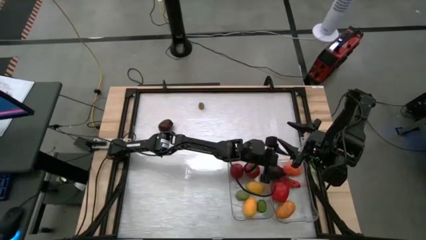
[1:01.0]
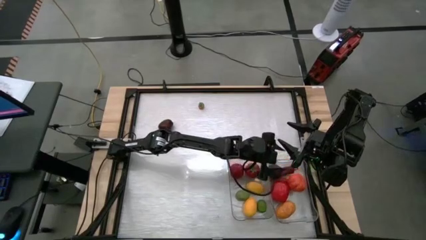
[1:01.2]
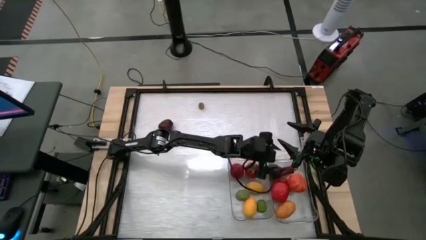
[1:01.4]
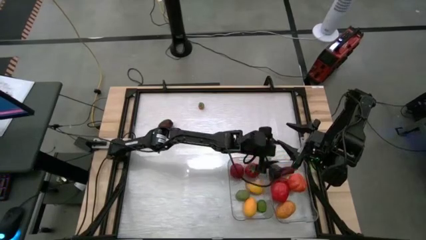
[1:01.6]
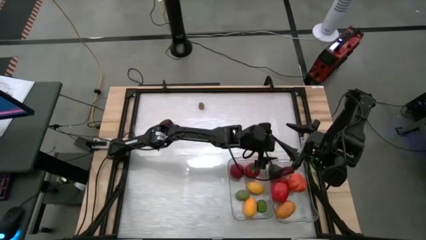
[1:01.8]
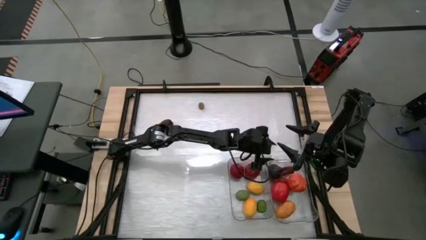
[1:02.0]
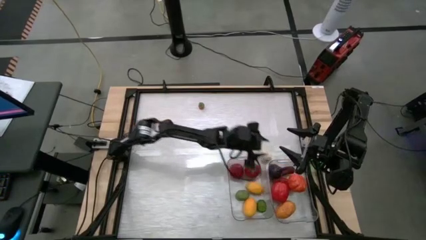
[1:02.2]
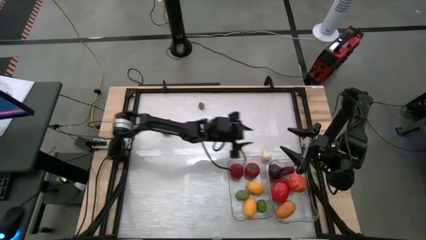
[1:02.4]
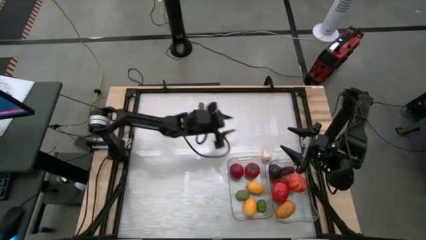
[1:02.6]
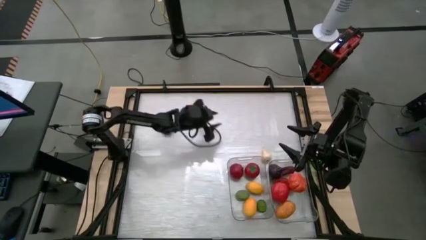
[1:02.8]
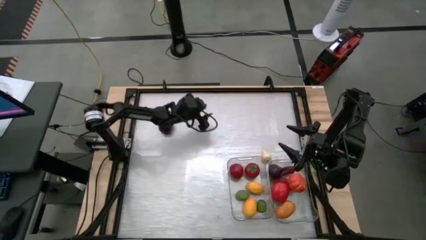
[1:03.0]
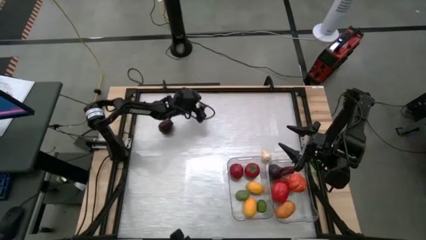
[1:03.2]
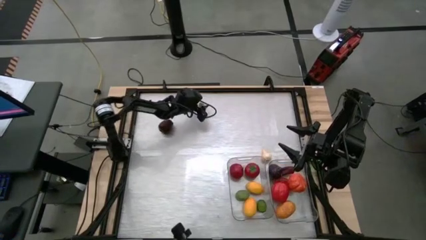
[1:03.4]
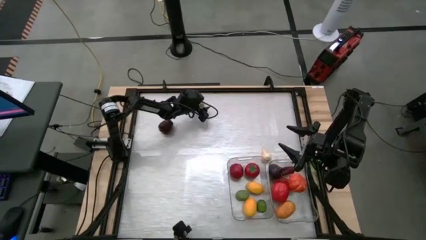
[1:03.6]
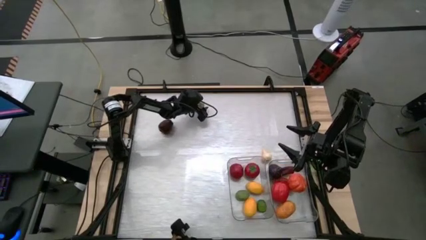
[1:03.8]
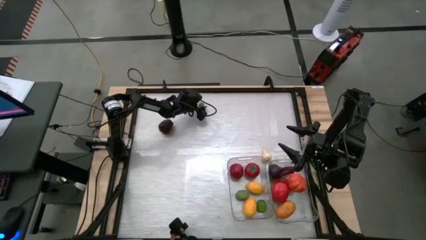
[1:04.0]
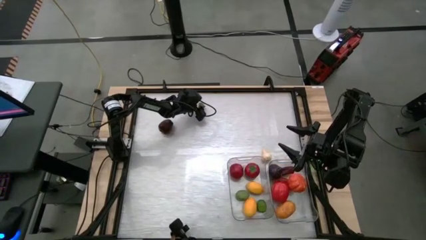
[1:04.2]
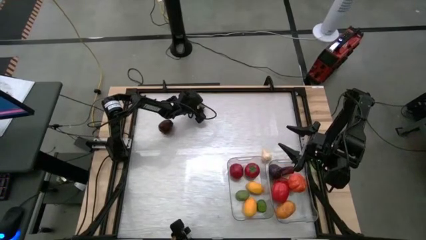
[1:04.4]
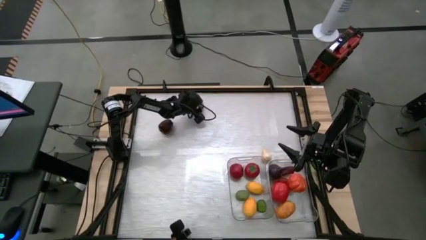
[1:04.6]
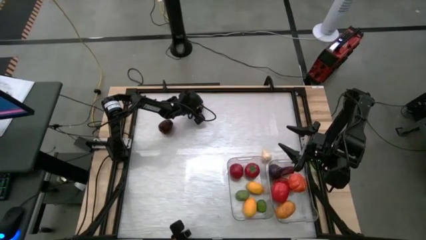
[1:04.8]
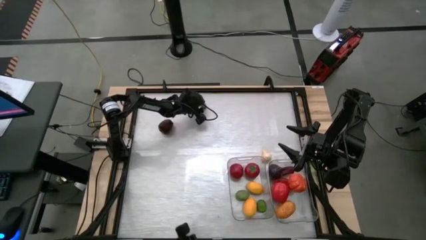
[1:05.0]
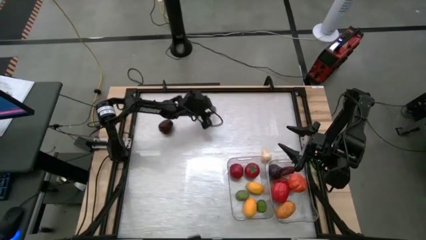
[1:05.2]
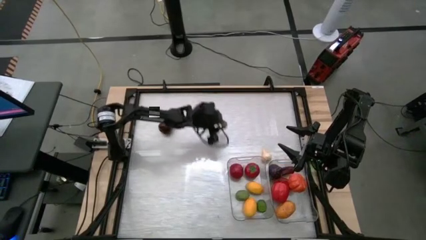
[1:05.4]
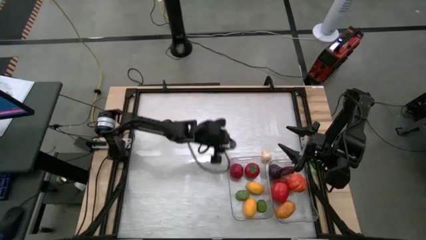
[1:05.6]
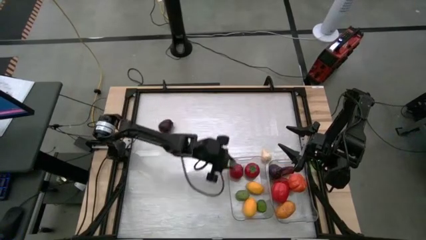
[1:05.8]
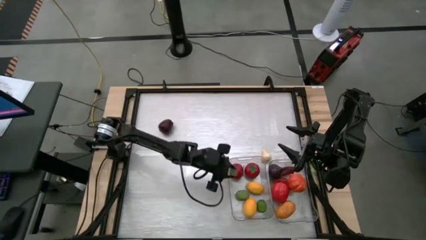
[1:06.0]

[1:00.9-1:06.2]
Task: Sort produce into baskets
Put the persimmon into the left transparent bin

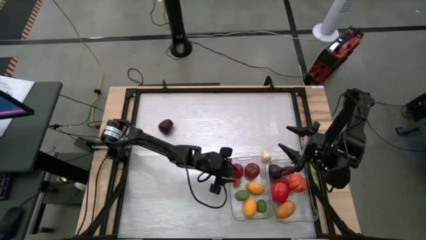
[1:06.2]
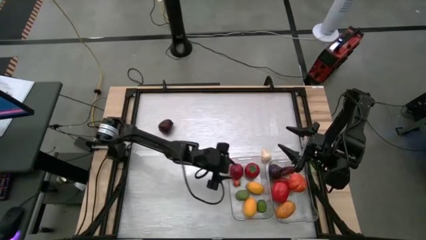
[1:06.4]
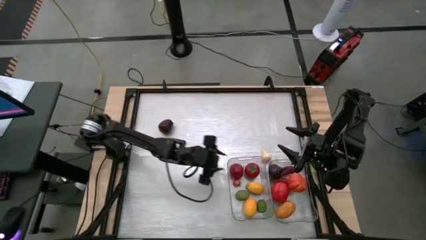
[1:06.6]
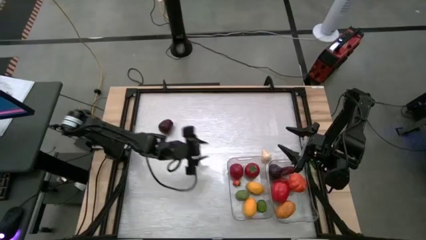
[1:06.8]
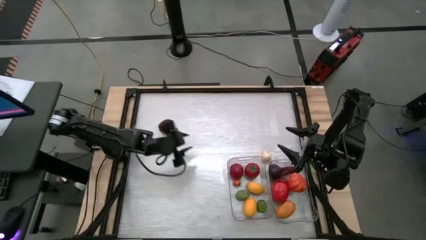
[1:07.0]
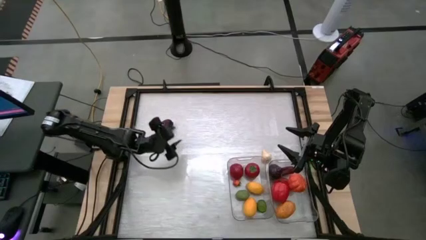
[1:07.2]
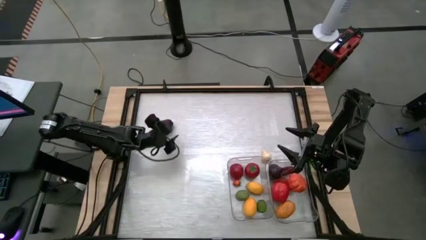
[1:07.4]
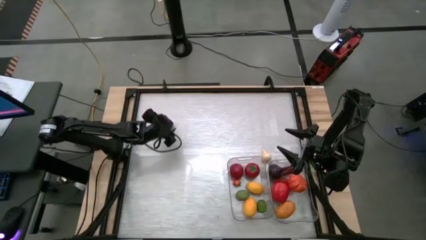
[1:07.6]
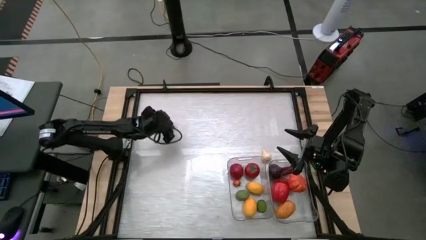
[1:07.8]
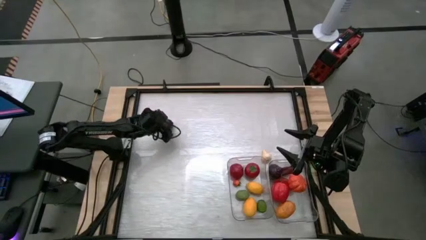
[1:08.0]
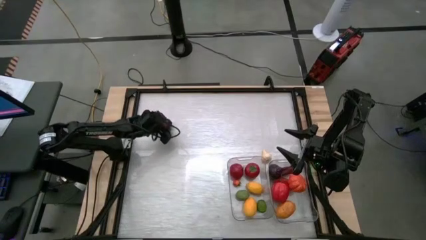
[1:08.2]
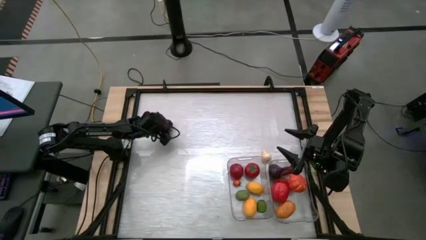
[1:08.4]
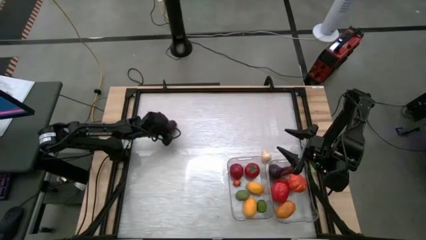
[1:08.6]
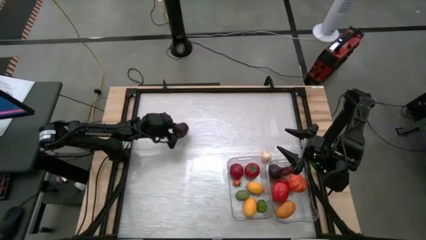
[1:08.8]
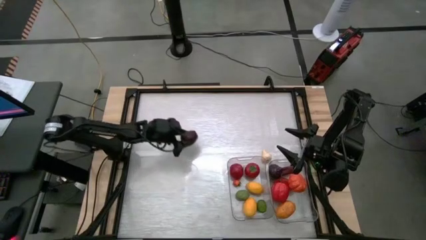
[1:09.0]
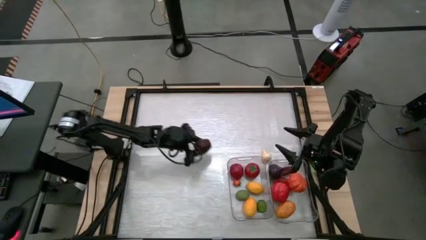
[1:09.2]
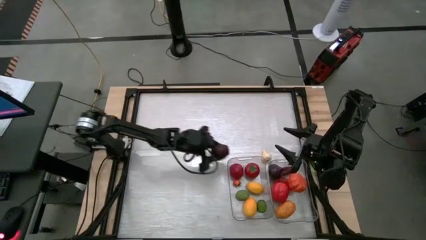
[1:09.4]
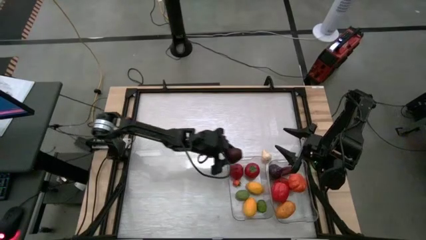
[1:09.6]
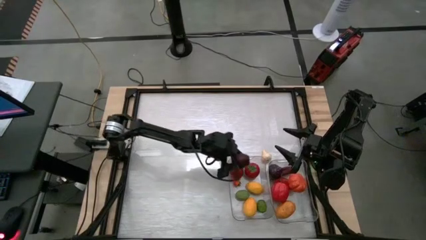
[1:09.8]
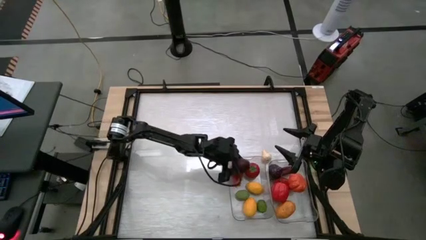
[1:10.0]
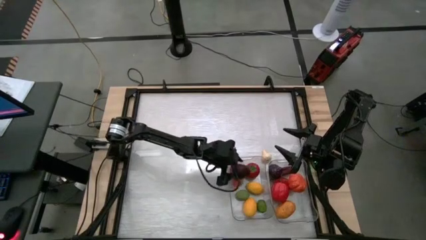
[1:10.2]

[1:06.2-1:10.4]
Put the apple into the left transparent bin

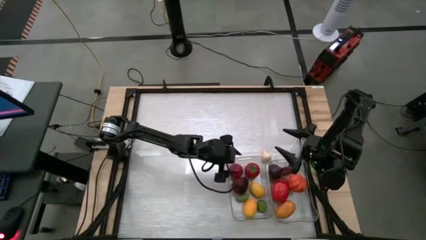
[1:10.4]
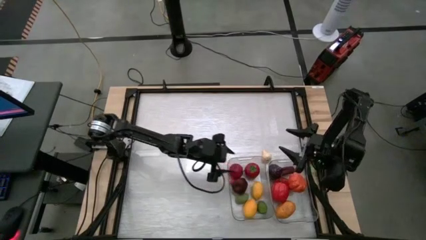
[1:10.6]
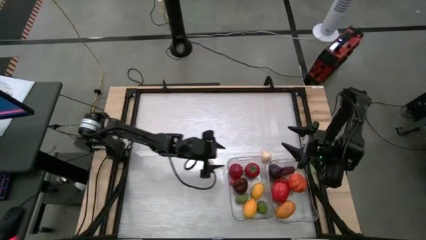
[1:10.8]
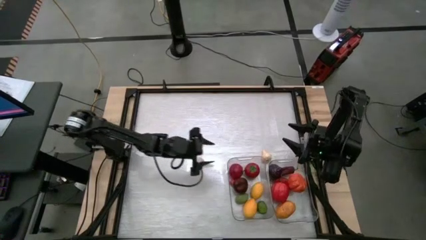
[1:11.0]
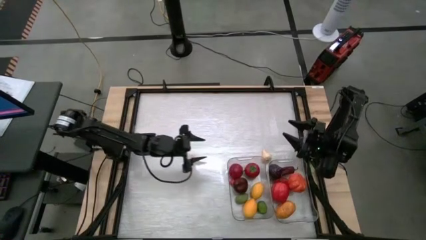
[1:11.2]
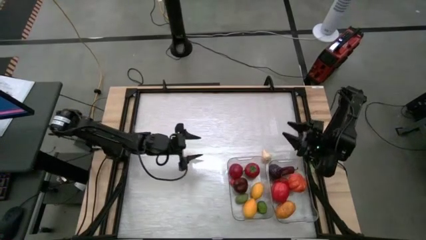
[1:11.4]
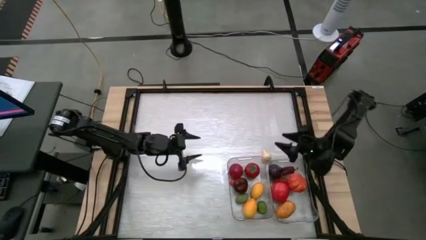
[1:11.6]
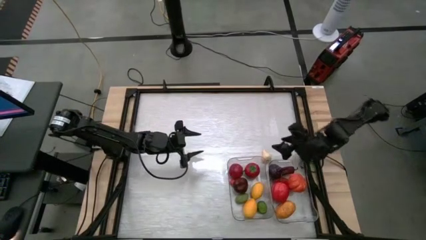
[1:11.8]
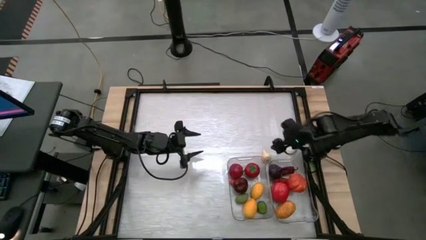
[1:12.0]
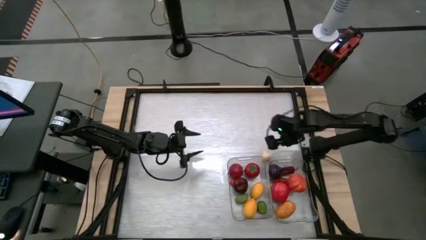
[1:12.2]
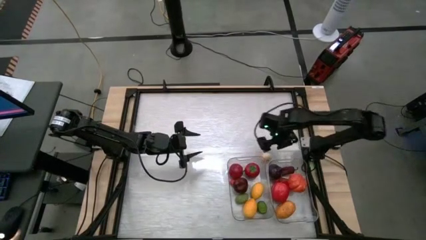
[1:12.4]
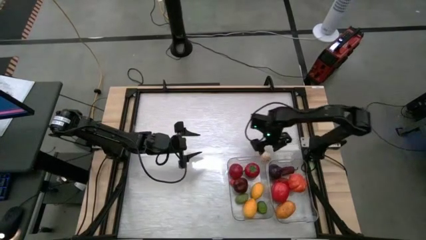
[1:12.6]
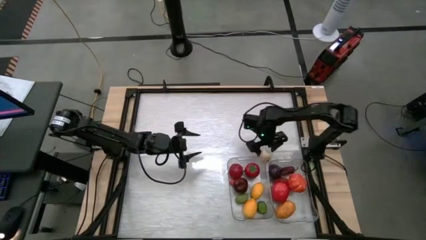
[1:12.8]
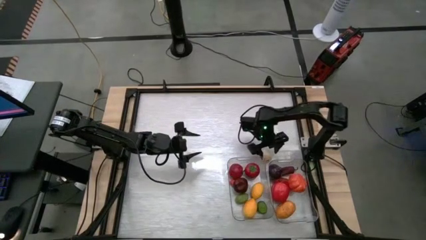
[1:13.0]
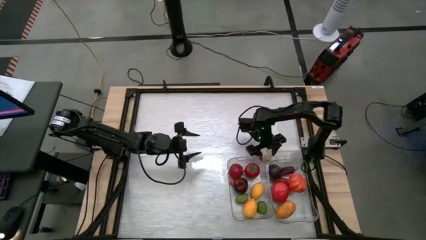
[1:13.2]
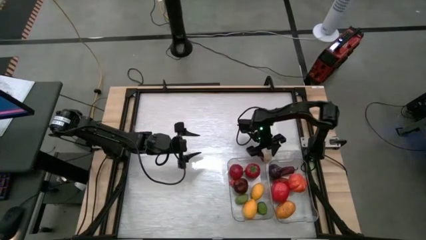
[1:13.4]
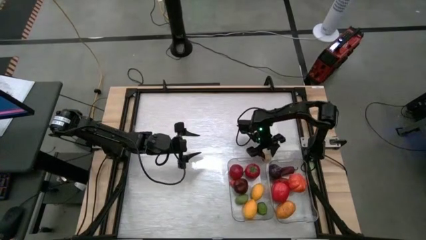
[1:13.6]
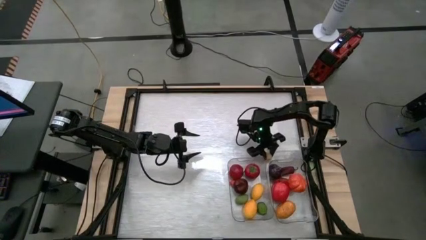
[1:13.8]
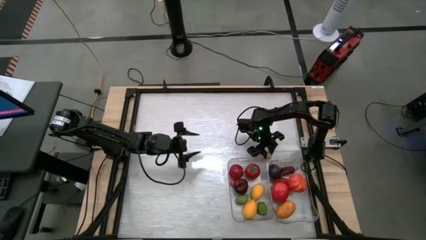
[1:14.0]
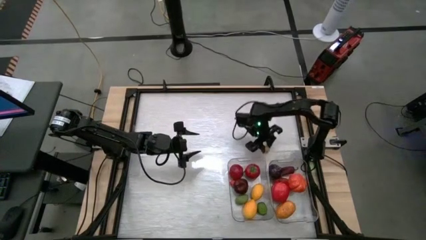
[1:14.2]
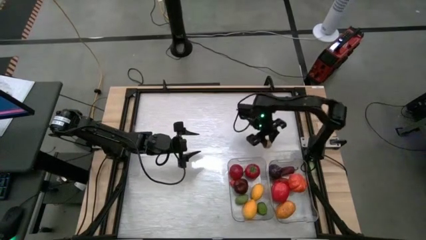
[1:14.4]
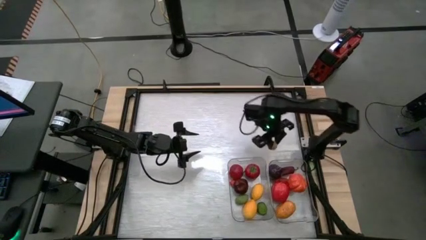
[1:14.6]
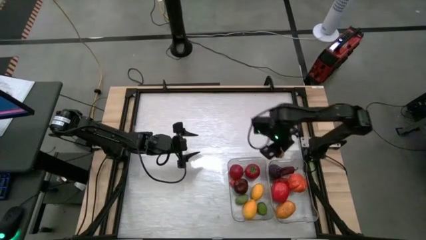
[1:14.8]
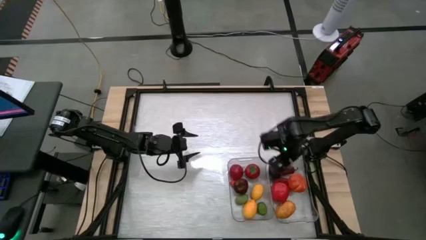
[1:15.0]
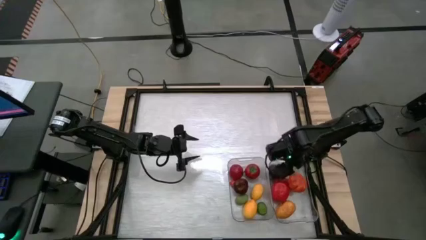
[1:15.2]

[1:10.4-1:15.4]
Put the garlic into the right transparent bin

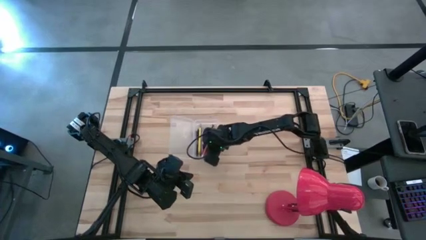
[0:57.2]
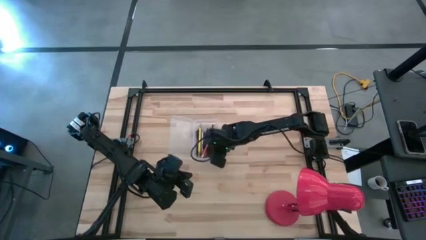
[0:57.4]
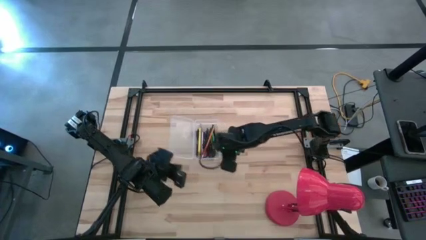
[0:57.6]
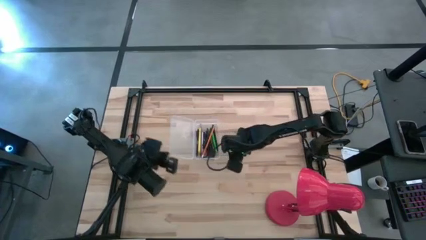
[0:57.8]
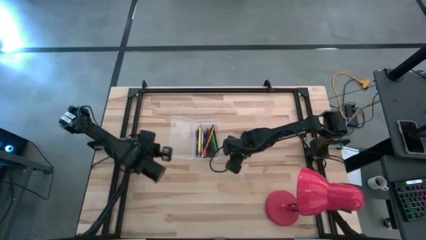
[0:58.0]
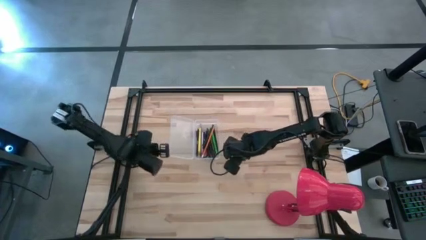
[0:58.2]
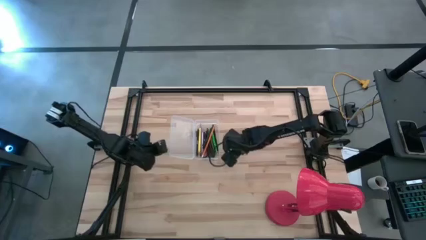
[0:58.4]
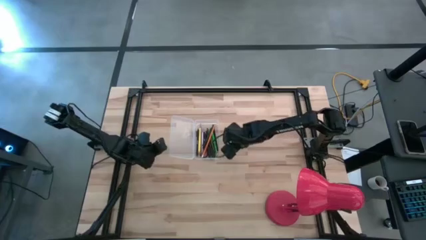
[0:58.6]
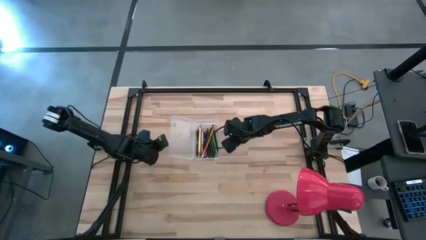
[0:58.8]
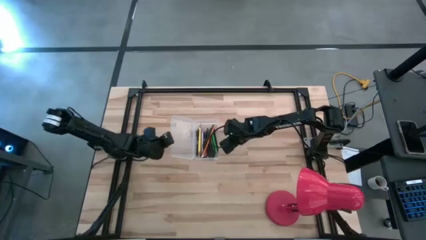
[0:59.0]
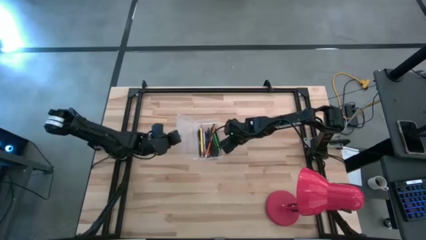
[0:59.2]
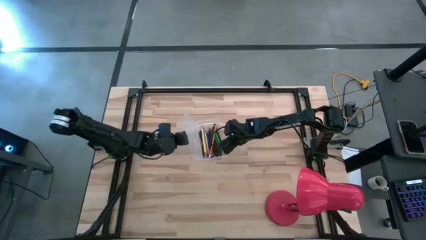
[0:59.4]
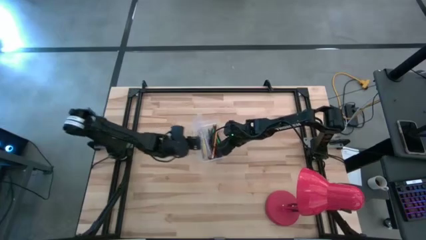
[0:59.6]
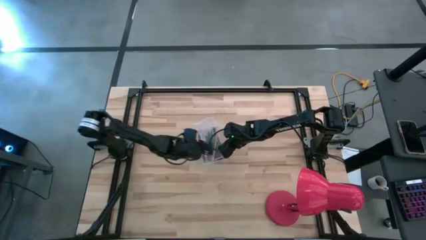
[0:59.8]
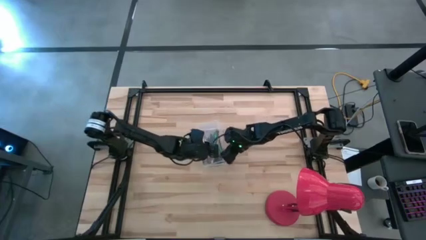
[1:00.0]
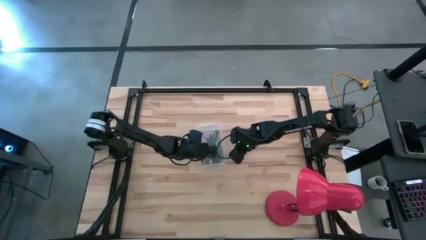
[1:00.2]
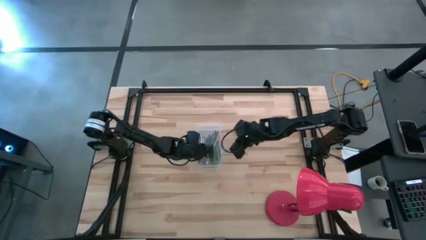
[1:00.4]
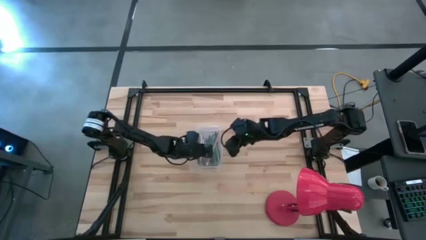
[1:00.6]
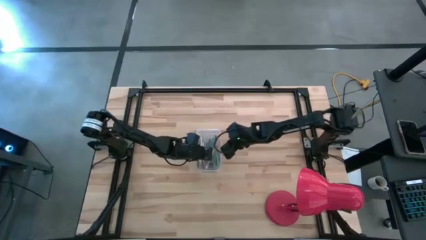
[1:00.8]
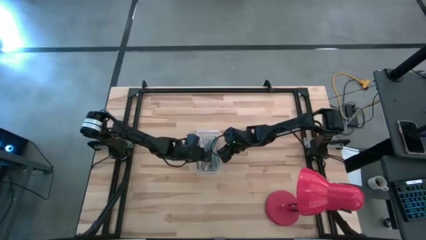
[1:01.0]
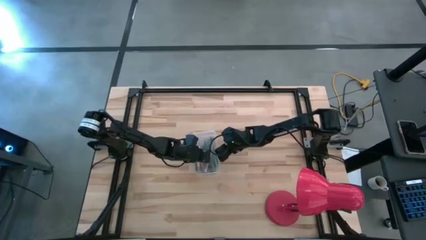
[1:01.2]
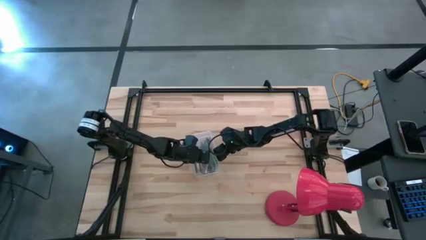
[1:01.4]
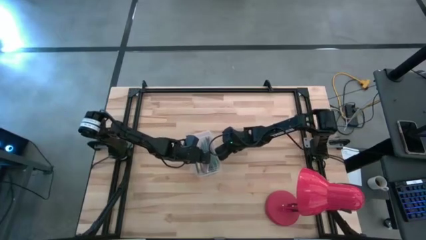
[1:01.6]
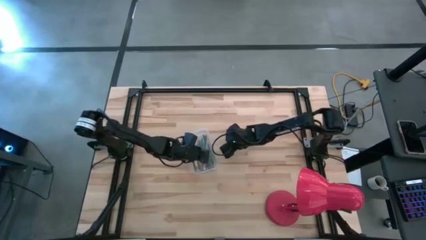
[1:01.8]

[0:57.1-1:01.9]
Task: Pick & place school supplies into a supply box
Close the transparent supply box
